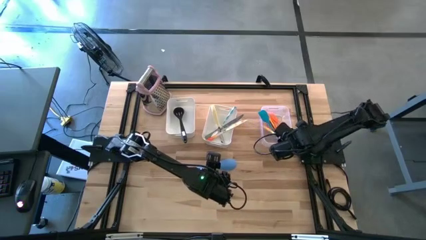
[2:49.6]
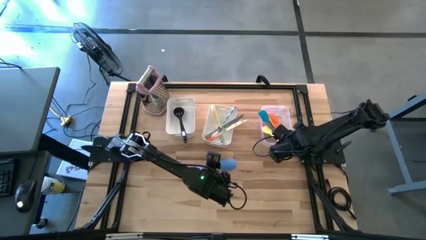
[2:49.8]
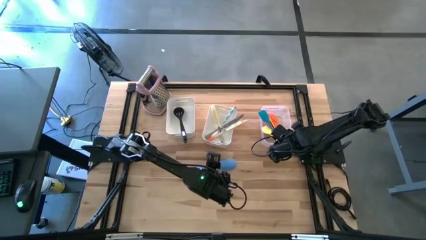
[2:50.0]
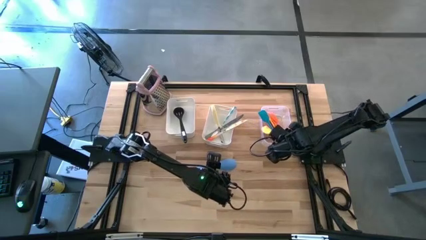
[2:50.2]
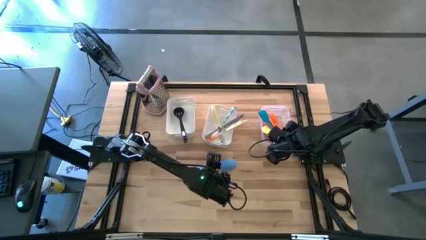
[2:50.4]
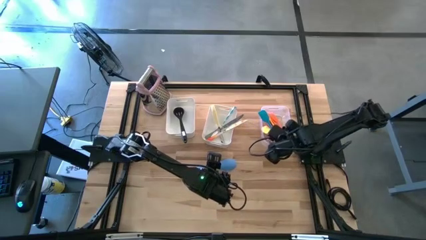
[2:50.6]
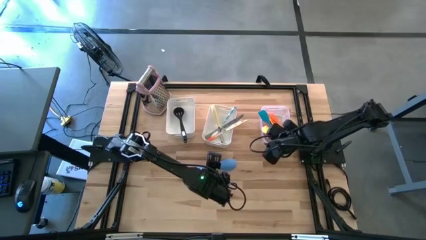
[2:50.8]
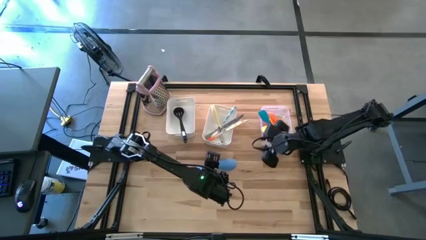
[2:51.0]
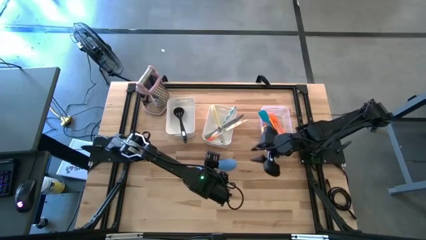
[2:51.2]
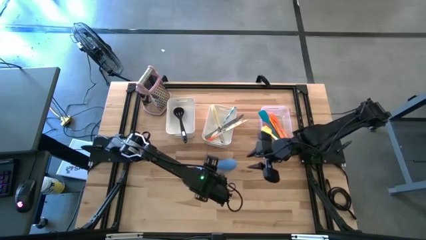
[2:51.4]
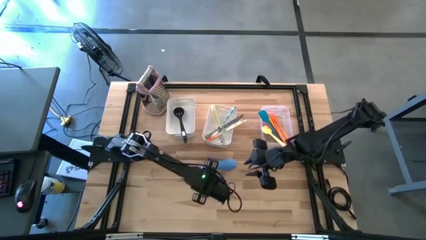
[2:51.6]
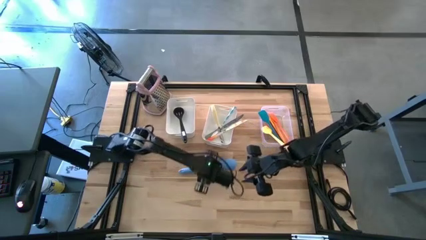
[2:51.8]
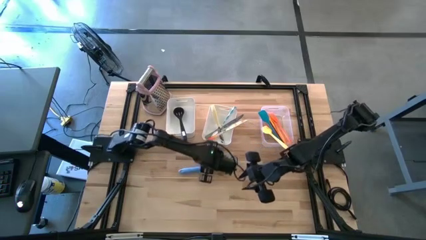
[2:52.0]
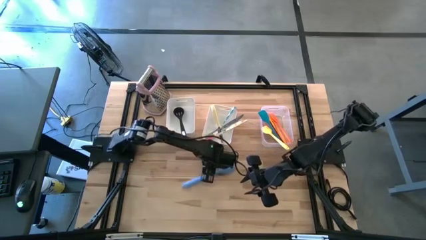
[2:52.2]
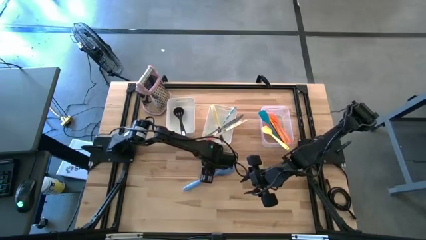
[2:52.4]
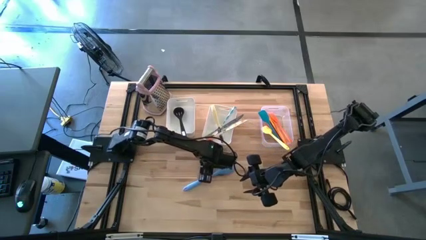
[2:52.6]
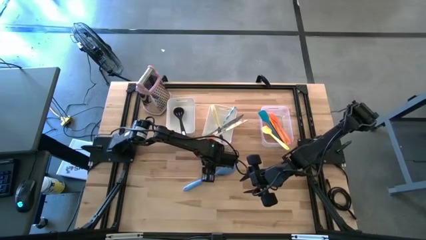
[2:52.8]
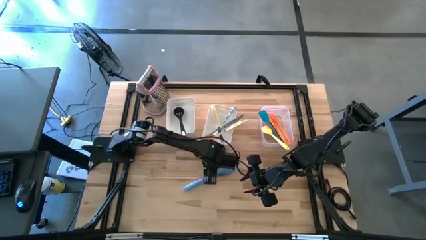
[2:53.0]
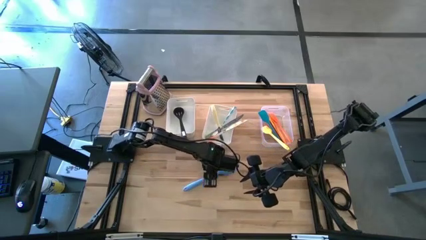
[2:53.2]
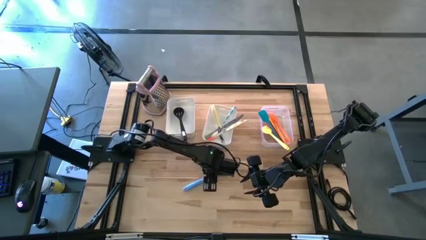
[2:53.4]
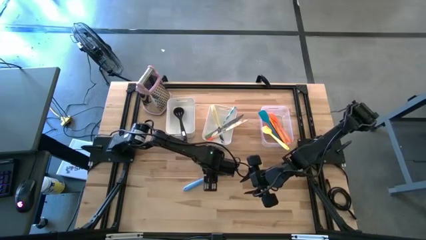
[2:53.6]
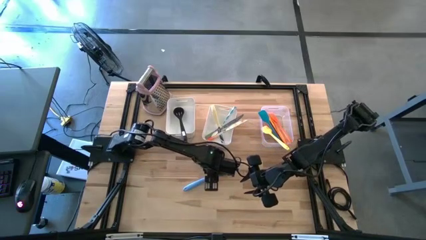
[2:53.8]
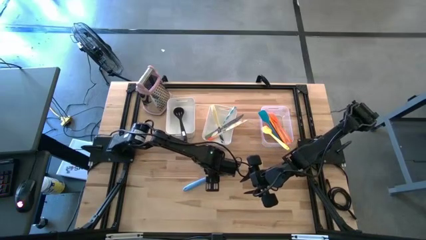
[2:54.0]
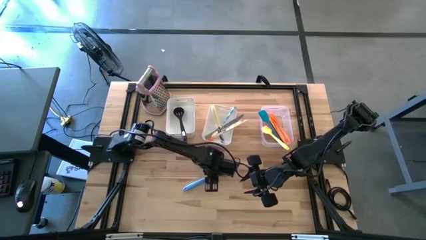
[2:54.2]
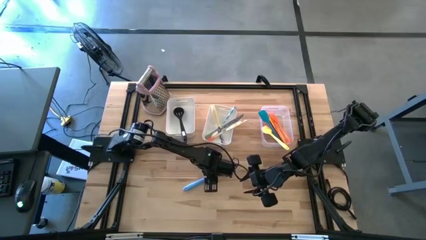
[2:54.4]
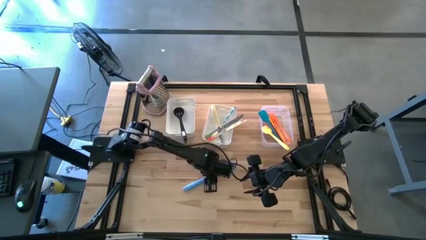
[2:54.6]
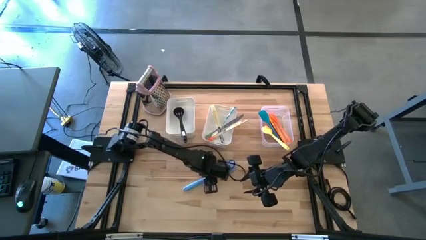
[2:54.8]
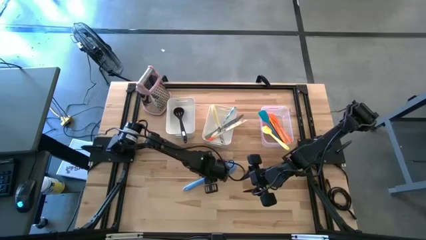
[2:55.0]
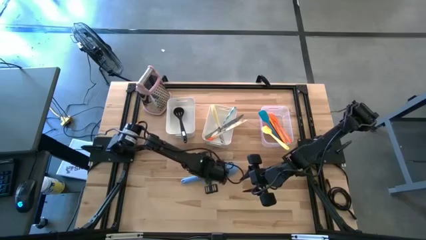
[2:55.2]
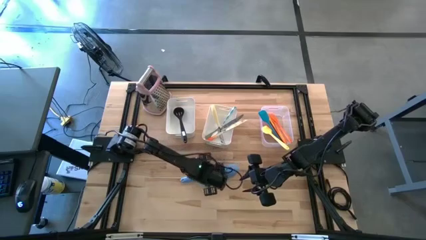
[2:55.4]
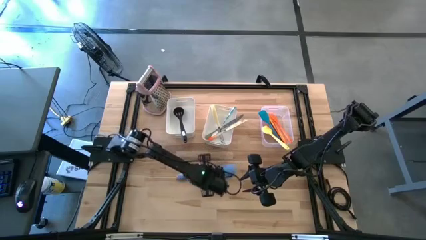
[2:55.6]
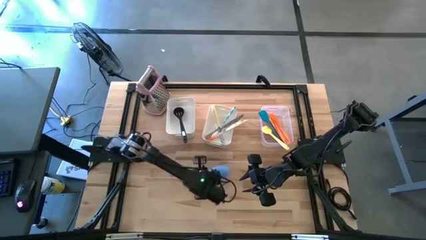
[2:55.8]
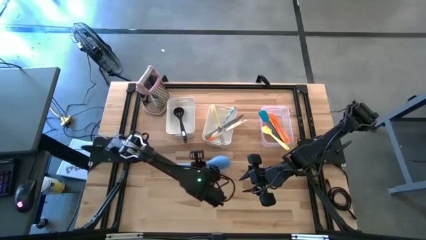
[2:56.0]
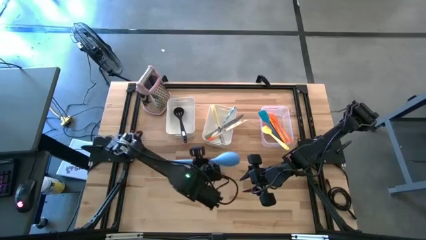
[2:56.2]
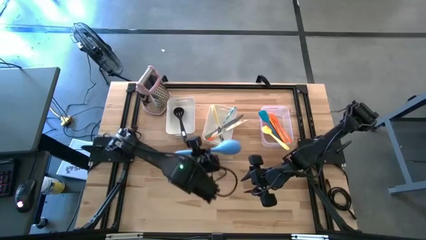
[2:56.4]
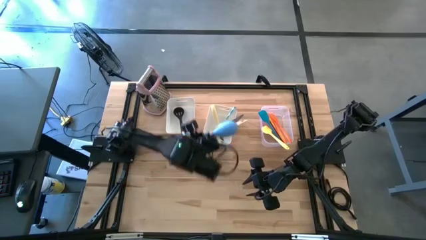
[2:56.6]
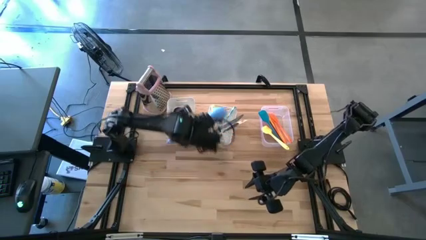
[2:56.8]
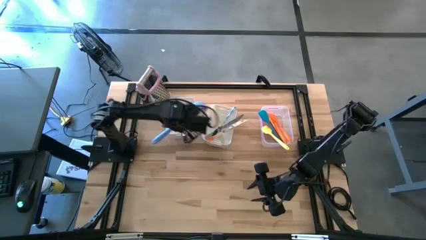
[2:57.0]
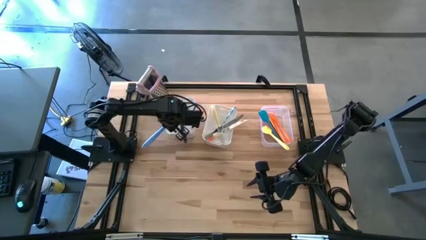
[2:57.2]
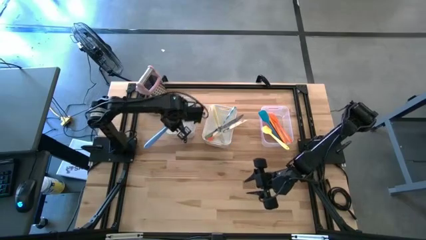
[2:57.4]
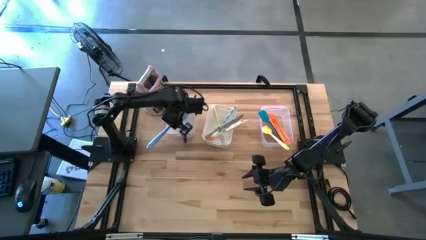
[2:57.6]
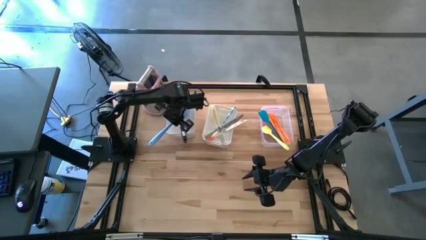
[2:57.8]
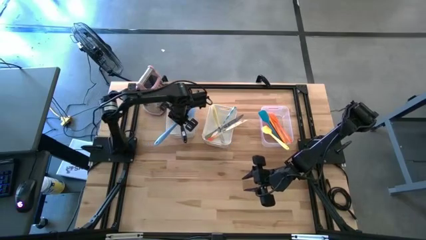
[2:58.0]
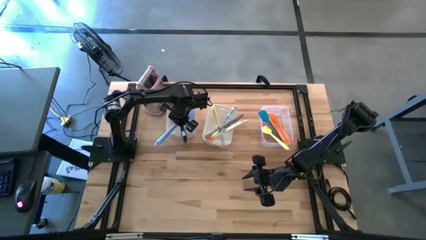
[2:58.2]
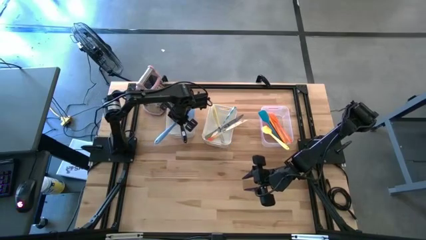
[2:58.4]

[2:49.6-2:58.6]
Task: Pick & Place Kitchen Items
Put the blue serving spoon into the left white bin

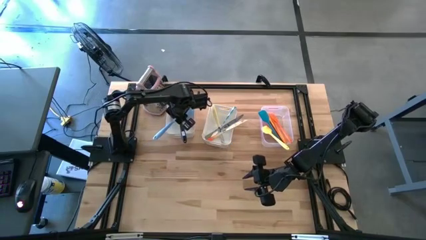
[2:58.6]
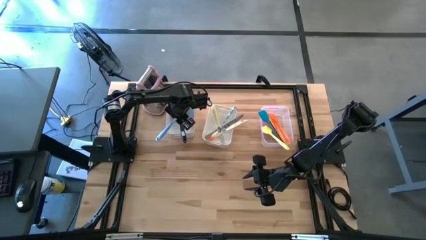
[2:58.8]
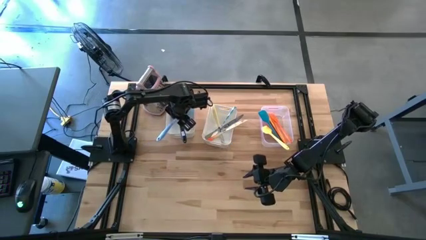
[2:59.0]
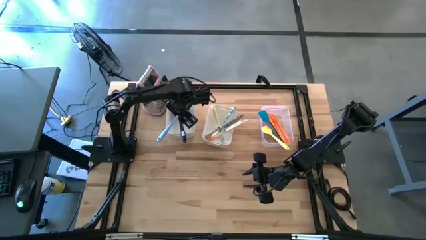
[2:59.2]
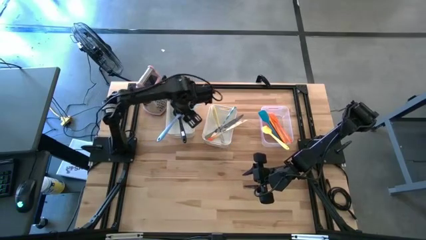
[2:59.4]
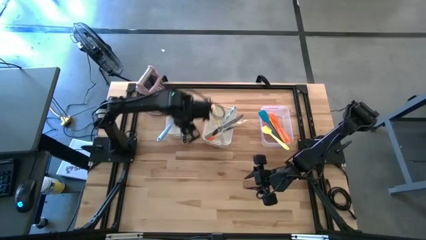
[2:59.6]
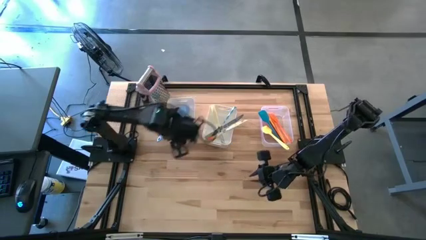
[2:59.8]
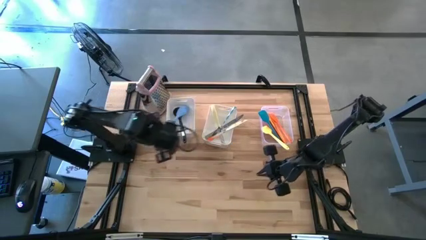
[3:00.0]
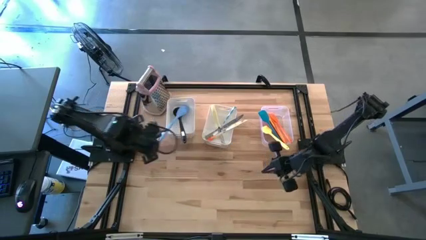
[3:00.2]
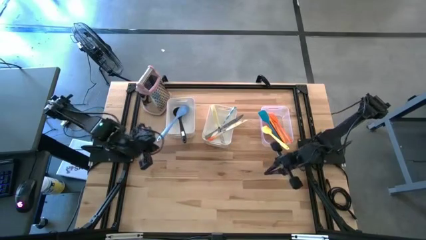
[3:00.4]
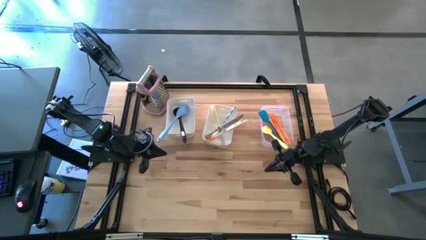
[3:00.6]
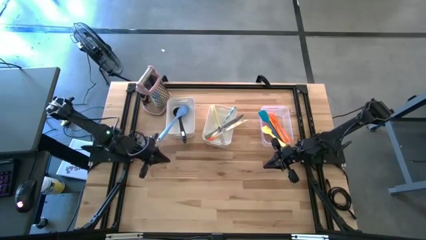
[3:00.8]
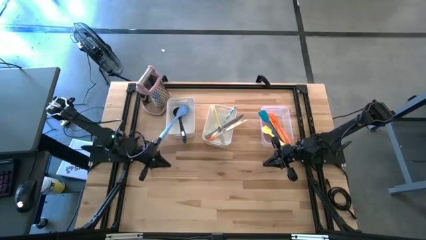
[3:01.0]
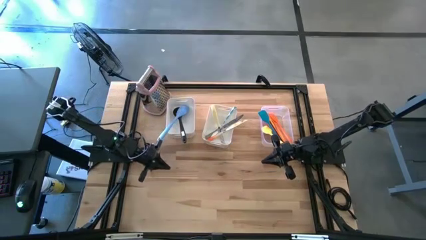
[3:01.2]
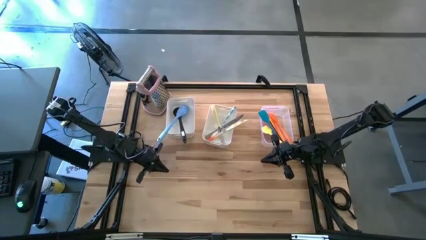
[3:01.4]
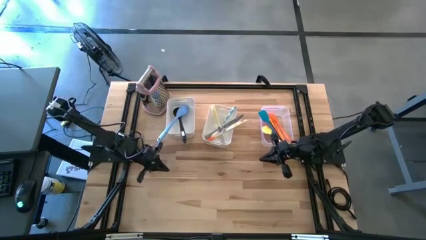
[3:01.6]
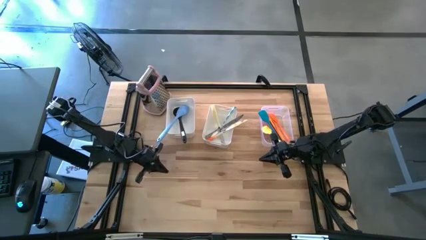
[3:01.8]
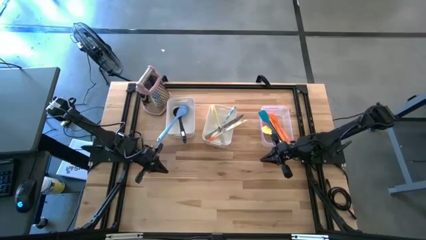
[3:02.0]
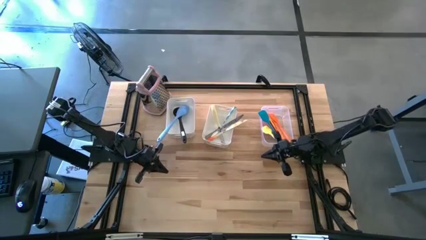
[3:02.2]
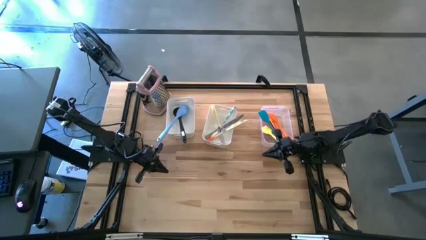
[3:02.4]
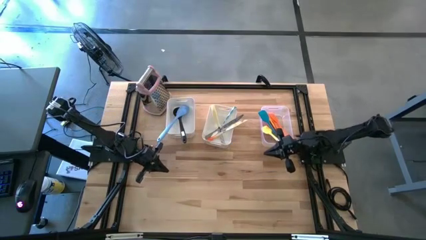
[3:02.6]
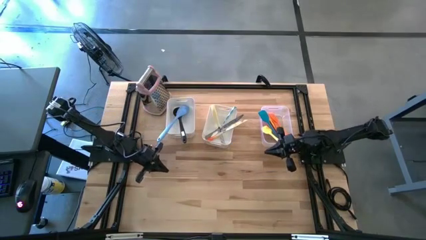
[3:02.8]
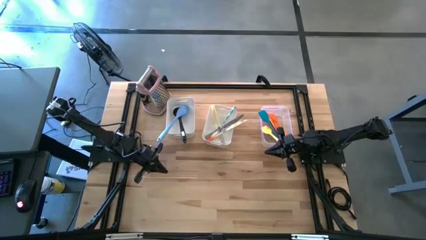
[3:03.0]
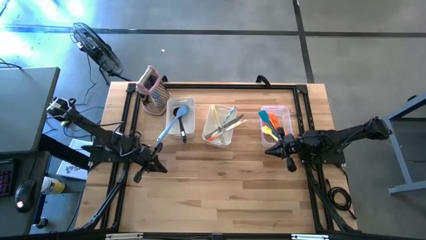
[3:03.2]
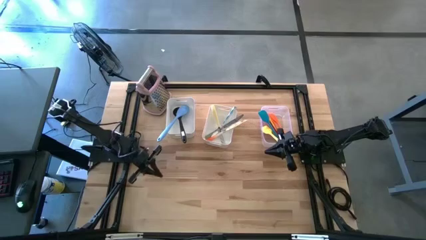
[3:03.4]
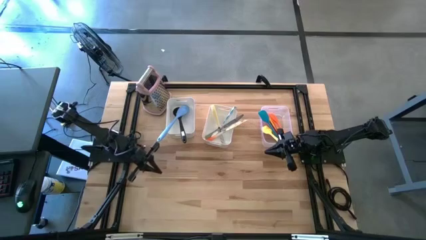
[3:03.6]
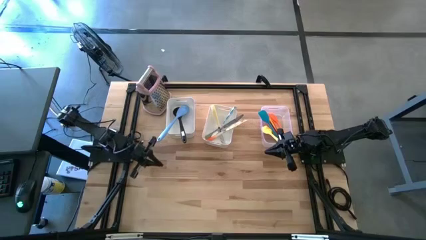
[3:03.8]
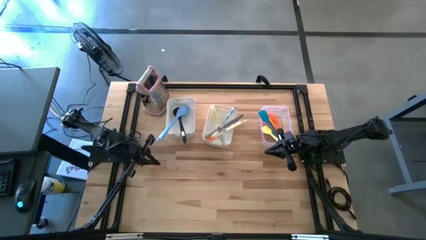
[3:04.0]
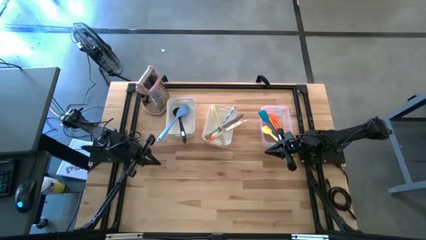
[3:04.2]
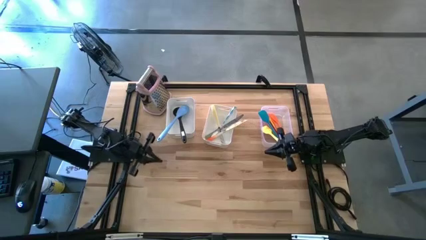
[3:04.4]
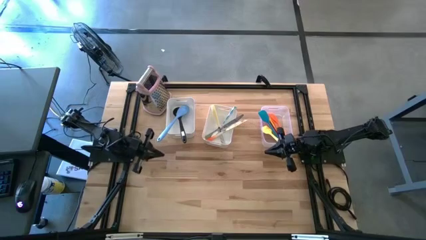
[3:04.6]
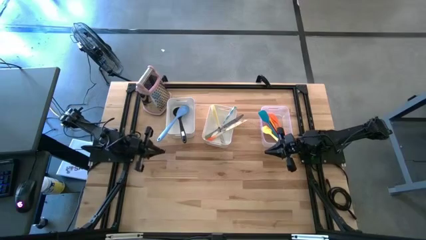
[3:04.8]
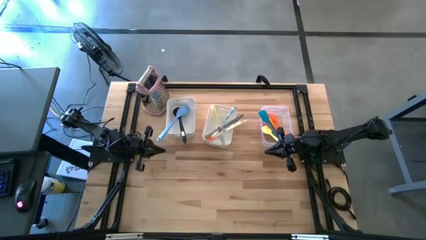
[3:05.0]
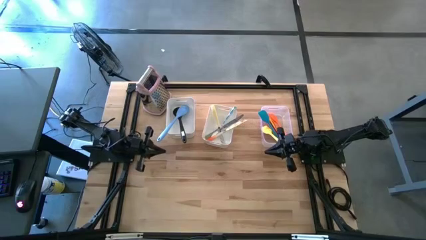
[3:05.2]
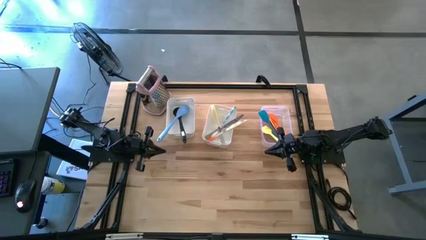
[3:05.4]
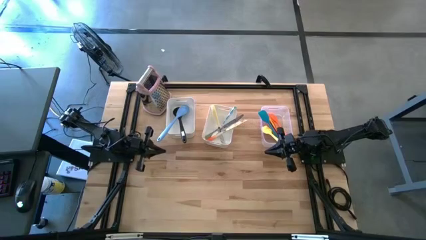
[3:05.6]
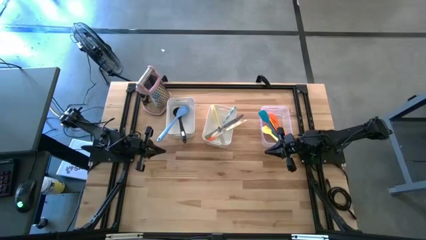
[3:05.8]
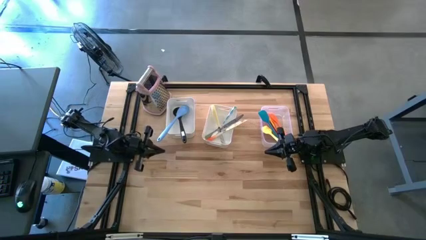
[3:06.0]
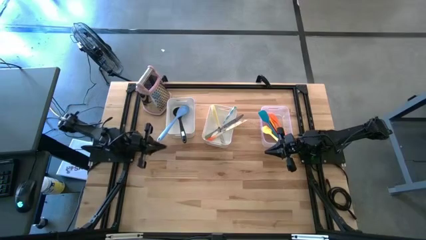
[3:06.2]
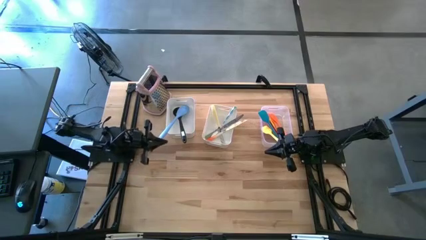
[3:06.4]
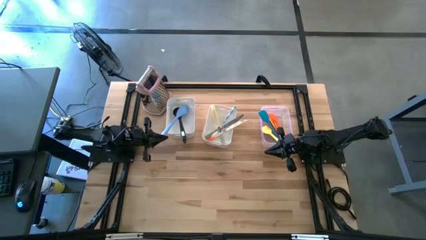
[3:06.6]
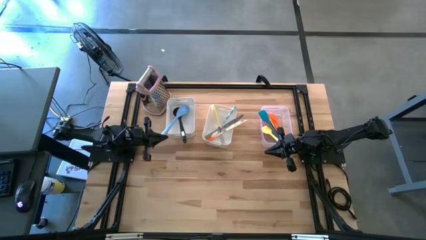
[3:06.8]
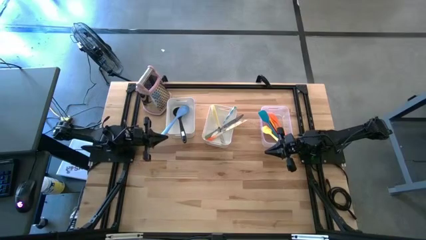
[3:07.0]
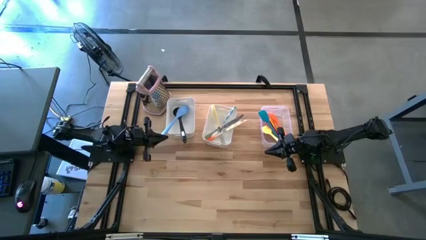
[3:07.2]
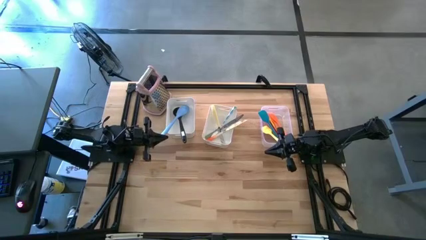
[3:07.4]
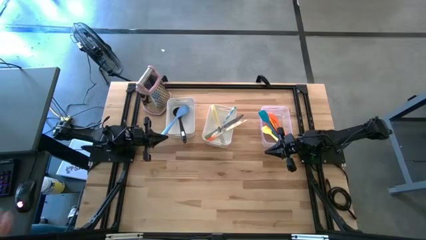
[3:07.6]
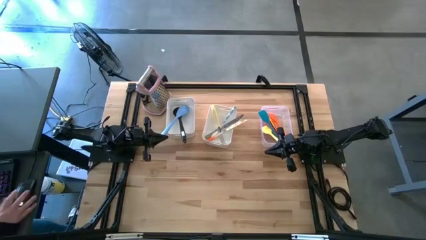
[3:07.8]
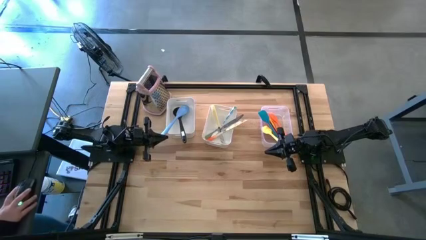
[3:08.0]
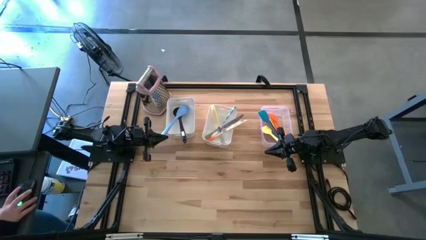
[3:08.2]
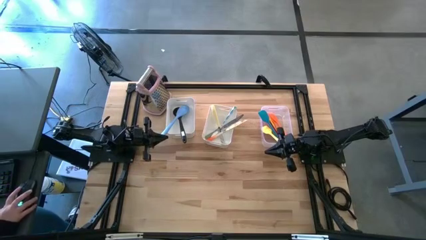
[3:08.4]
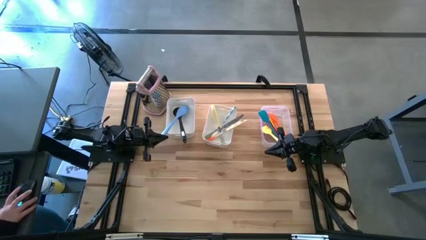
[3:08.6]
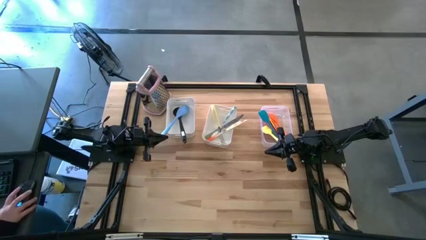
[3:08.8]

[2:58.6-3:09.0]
Return to Home Position
